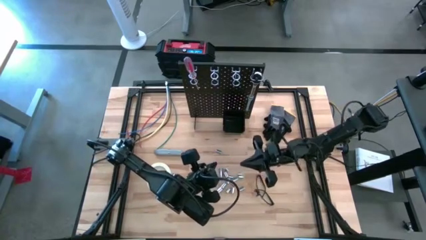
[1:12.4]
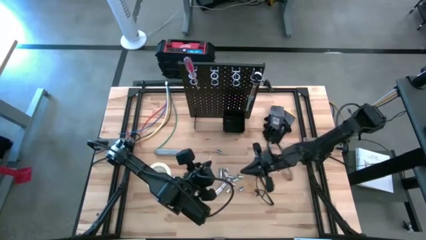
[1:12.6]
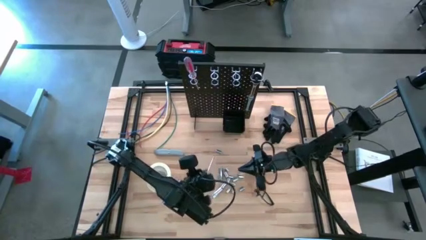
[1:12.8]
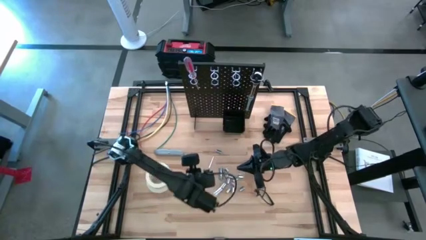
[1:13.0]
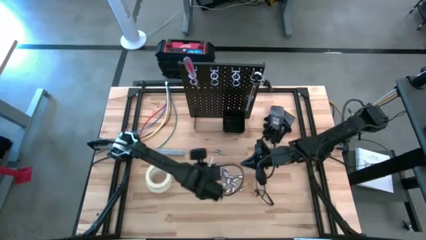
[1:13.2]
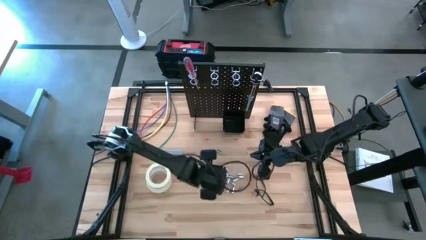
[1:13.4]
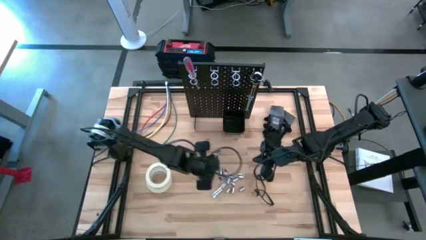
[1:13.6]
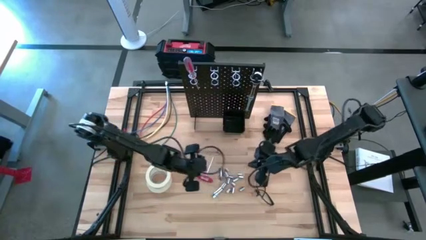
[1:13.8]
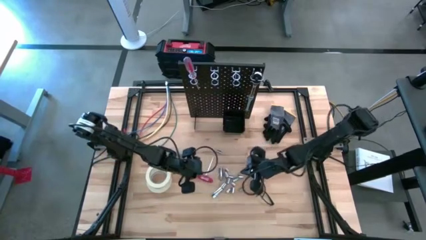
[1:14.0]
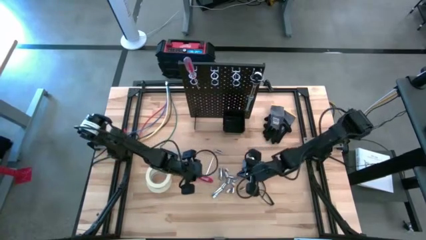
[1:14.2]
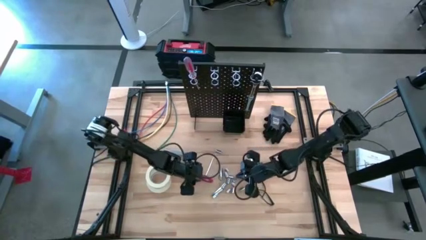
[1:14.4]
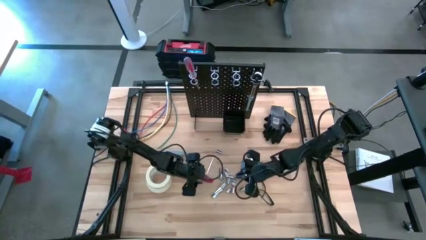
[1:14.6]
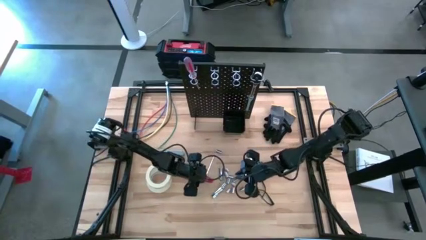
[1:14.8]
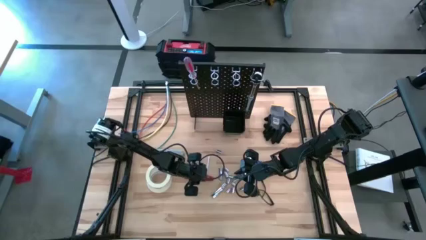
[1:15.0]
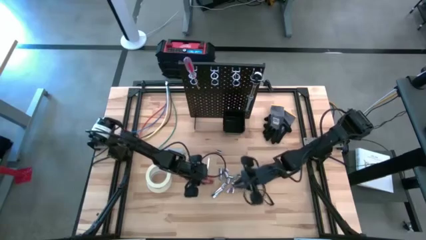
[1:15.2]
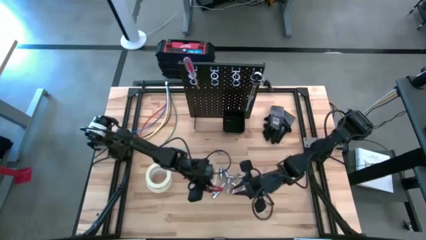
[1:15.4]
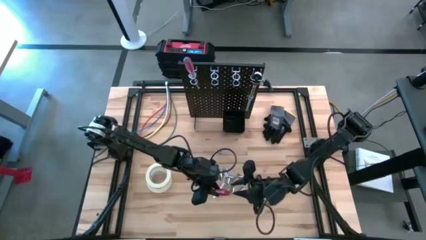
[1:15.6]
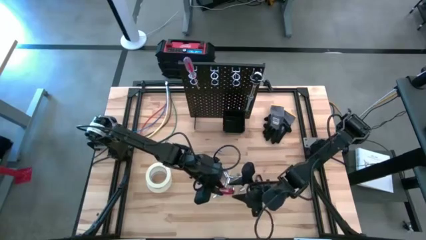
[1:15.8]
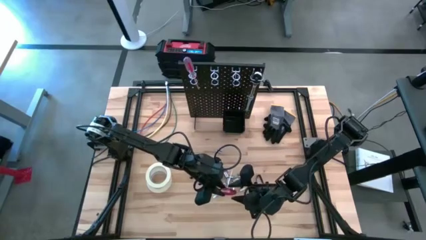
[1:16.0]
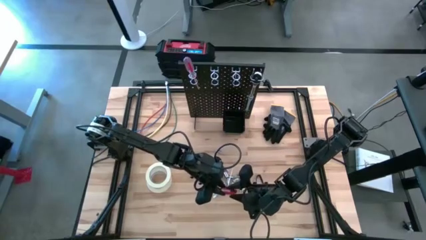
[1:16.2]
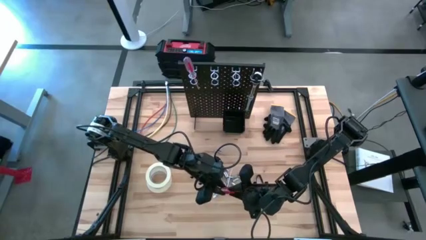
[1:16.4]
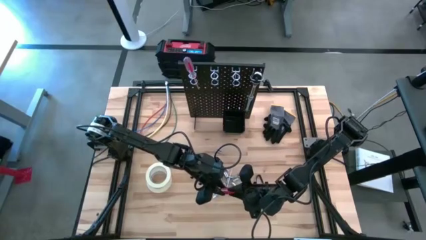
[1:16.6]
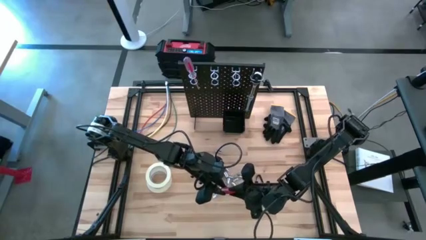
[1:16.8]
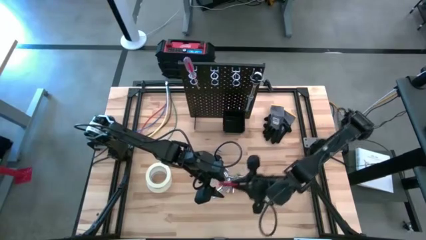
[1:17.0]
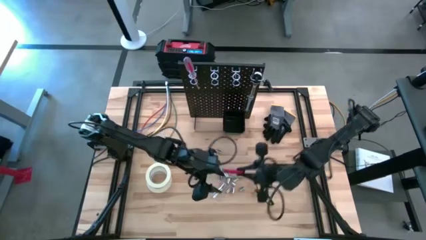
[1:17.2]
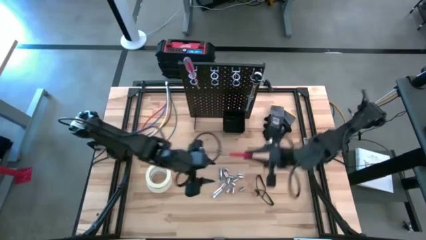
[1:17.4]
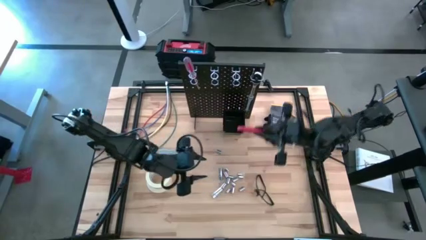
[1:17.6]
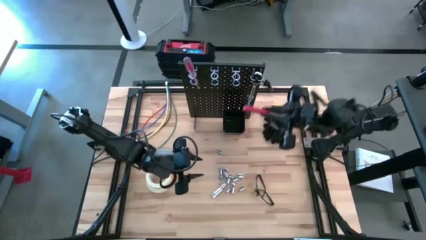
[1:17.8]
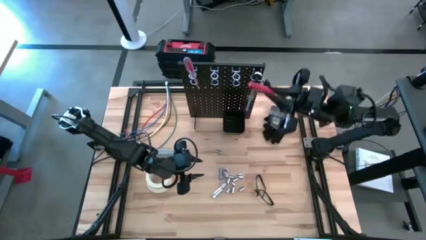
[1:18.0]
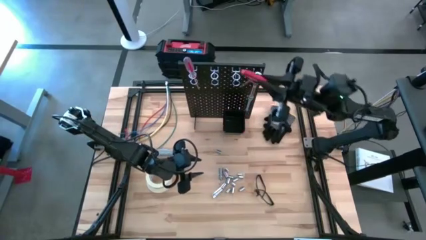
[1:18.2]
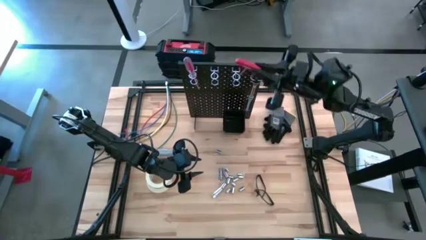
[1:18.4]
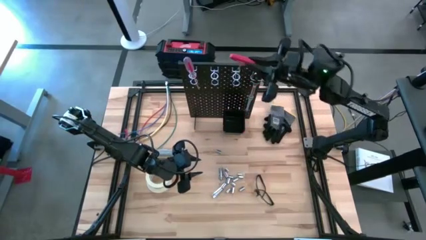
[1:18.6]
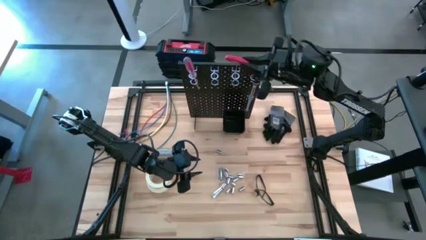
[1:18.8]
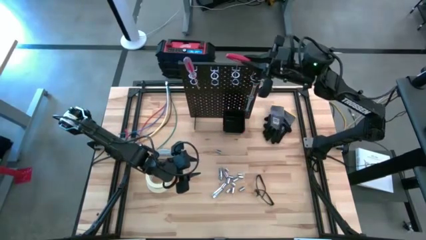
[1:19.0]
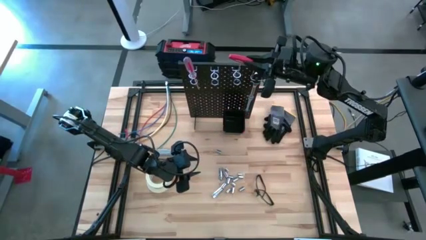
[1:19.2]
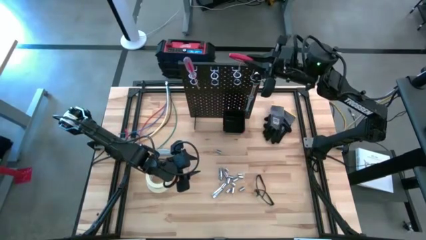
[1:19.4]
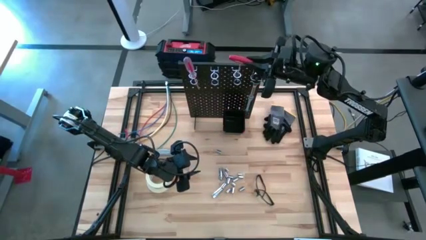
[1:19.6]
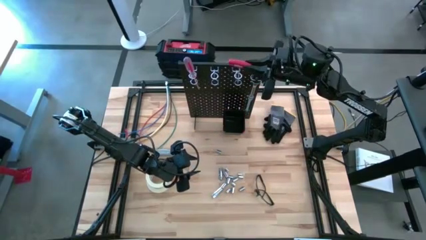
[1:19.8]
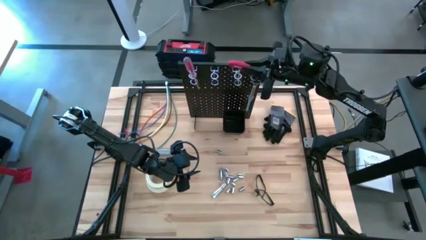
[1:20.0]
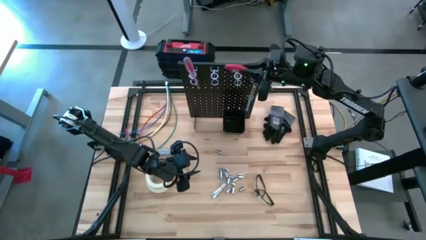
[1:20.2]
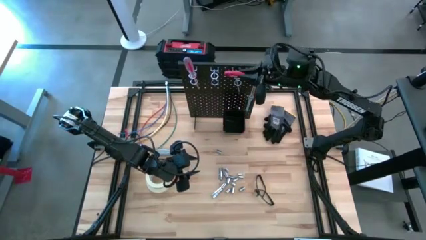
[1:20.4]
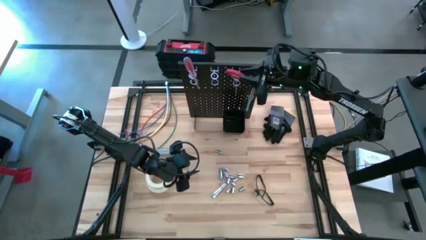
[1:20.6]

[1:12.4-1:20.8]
Task: Hang tools onto peg board
Hang the red allen wrench on the peg board

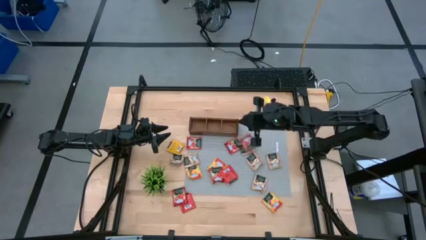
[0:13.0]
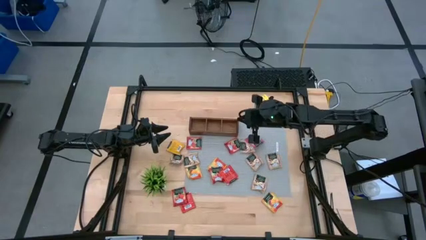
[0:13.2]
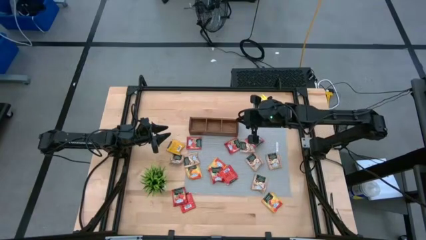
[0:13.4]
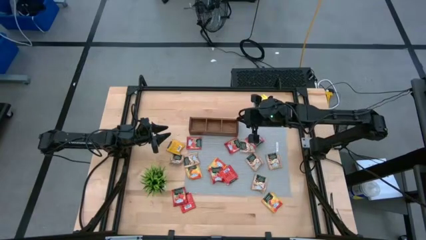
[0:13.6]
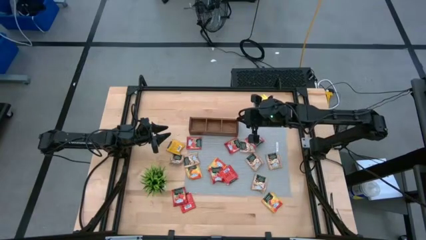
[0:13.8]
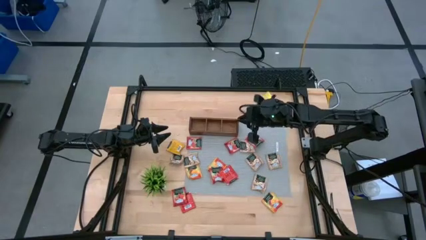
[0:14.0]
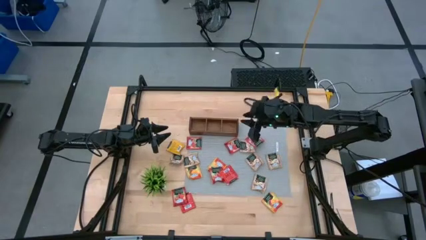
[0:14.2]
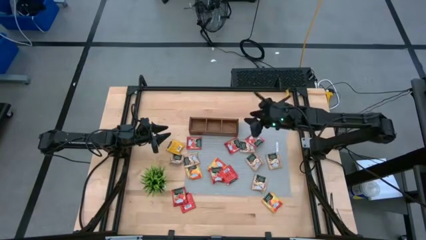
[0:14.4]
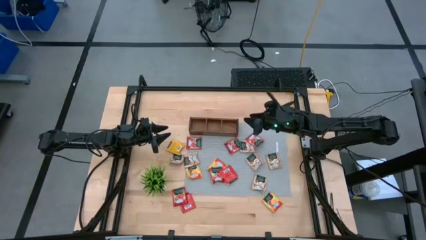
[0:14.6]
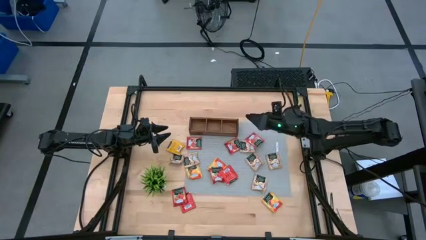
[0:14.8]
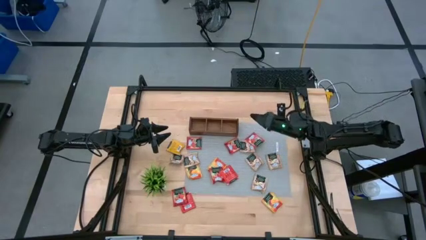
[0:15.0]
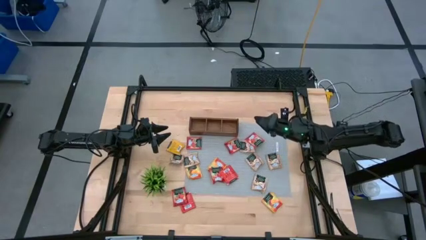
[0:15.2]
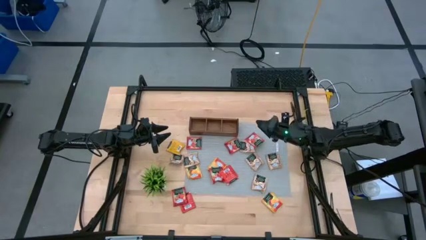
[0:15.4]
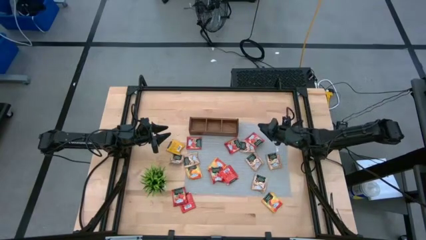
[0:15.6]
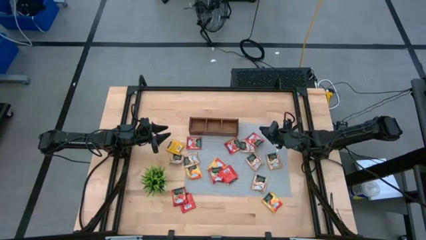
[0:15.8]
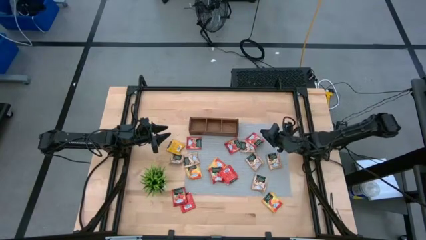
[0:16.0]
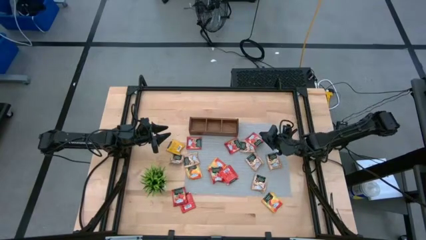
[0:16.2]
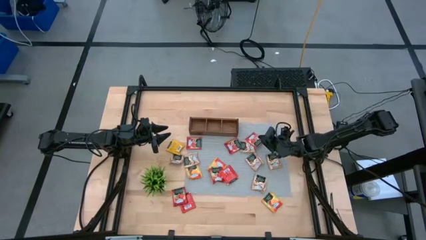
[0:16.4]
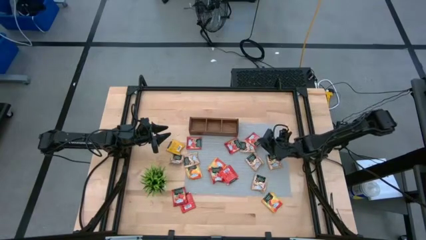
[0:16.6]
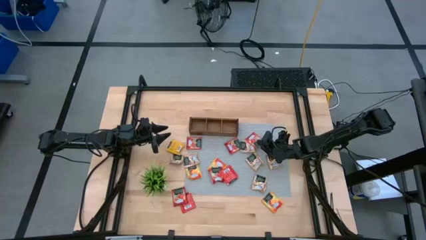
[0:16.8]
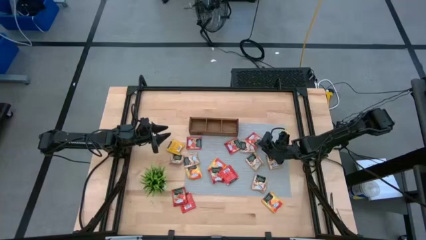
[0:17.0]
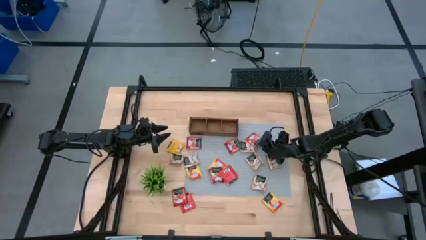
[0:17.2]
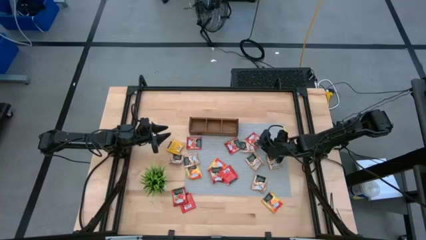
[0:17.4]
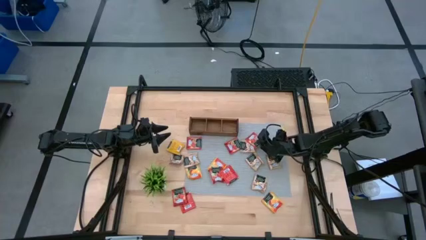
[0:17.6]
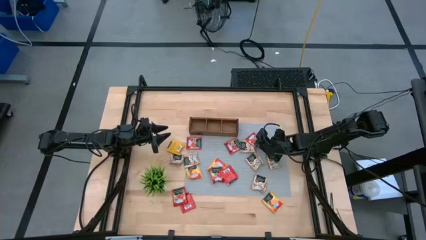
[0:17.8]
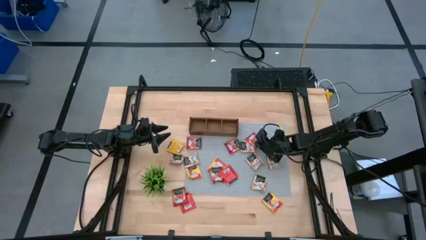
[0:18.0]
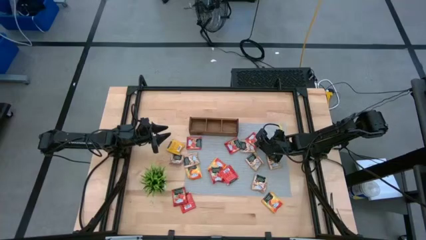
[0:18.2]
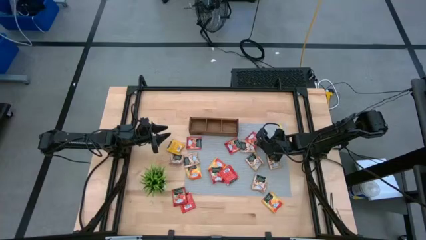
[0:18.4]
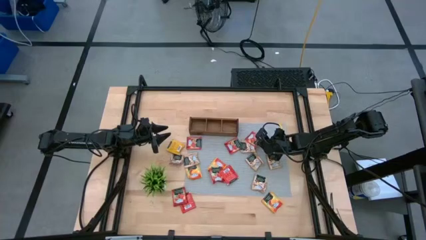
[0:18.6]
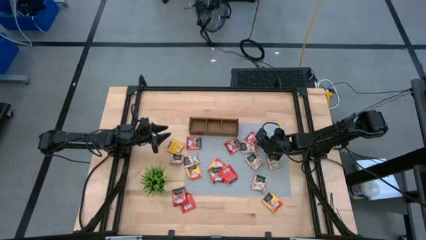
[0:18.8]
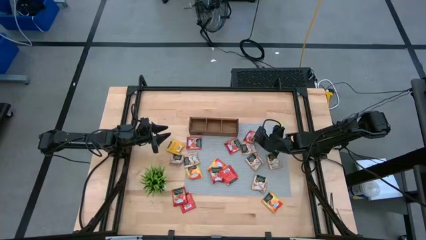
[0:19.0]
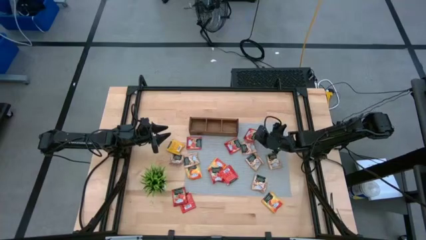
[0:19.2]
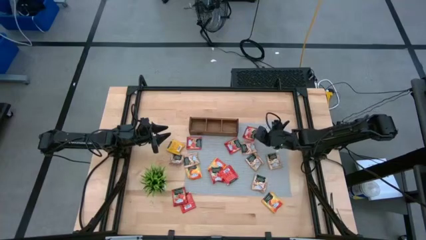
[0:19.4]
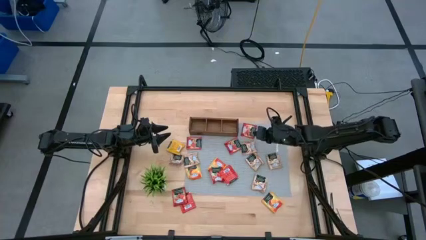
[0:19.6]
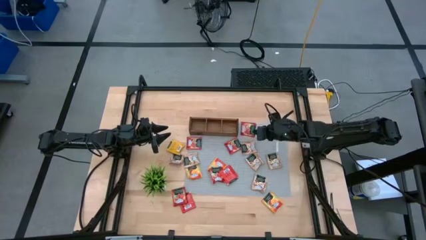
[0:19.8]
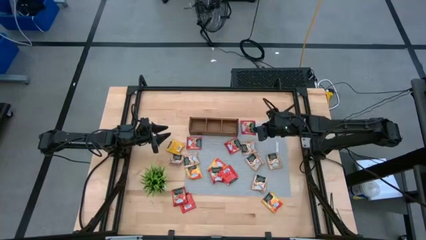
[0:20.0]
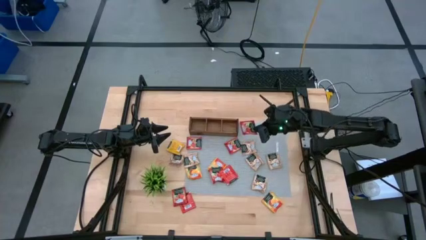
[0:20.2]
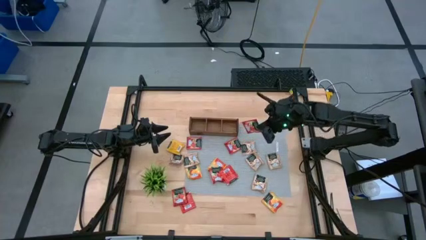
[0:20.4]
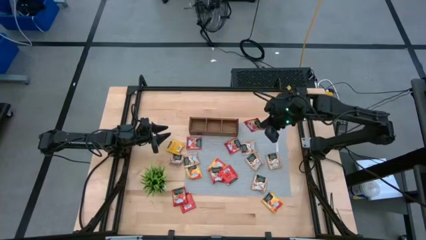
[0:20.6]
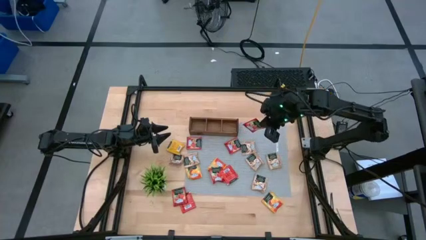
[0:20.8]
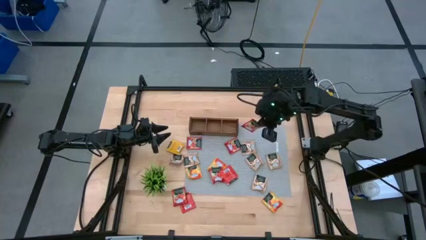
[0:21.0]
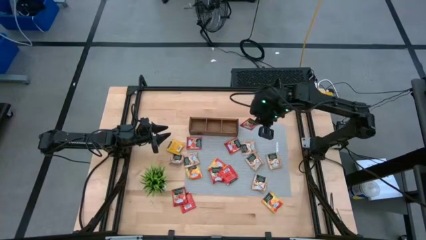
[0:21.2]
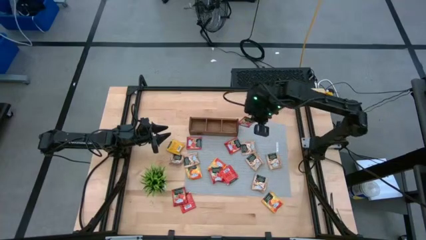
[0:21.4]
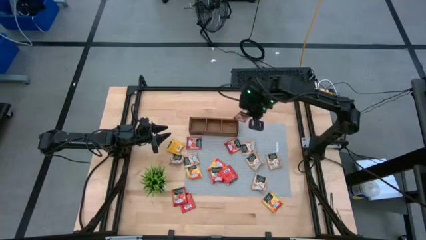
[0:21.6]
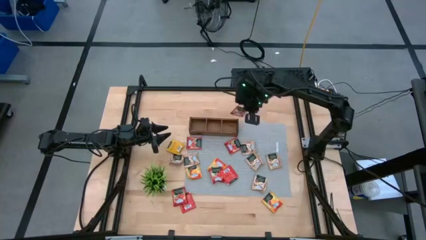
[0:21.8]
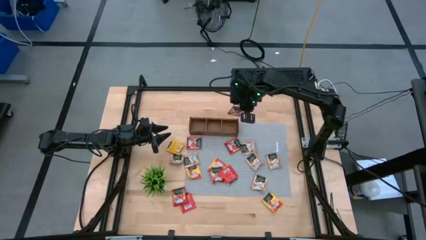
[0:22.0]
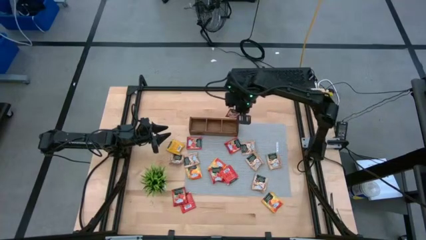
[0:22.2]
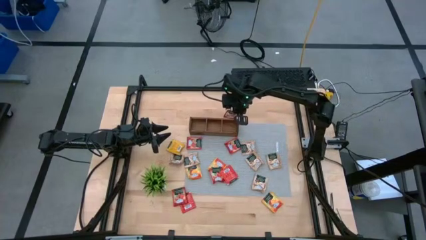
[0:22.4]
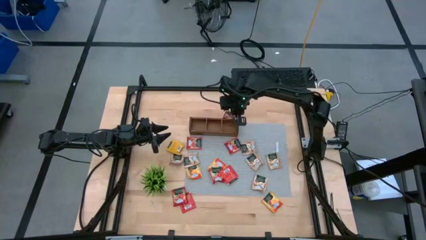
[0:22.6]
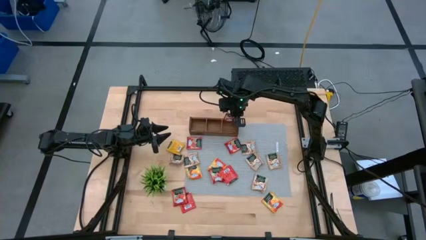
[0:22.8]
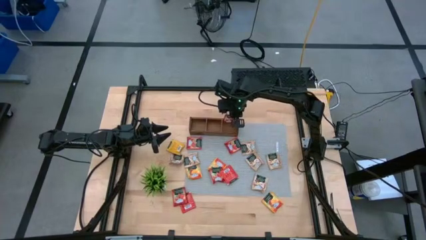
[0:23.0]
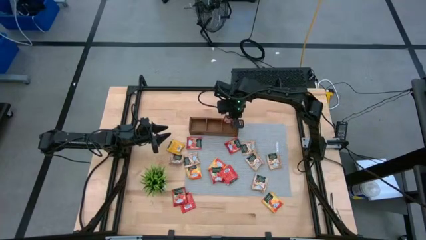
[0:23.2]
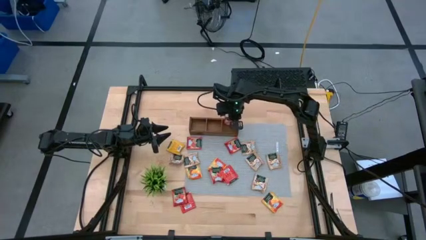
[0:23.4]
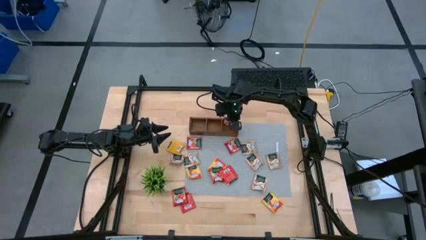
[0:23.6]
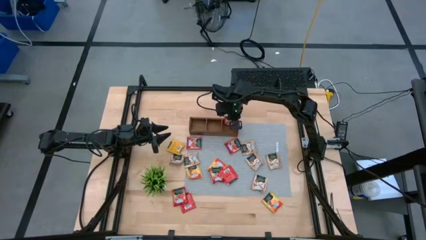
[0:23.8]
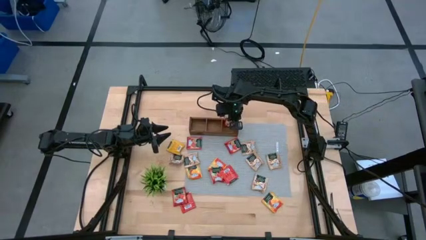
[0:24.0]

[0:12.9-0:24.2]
Task: Pick & Place Tea
Put the red tea bag into the right section of the wooden organizer
